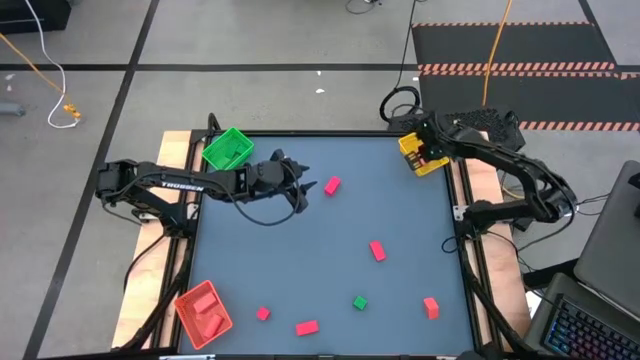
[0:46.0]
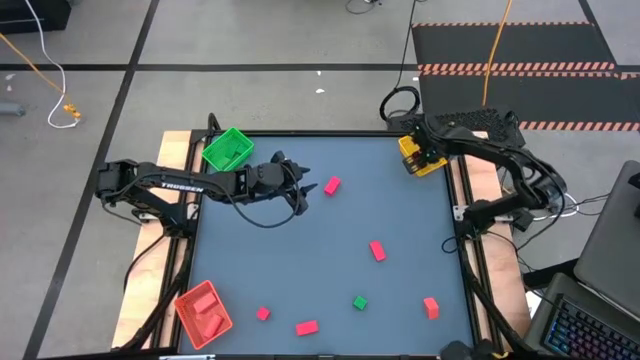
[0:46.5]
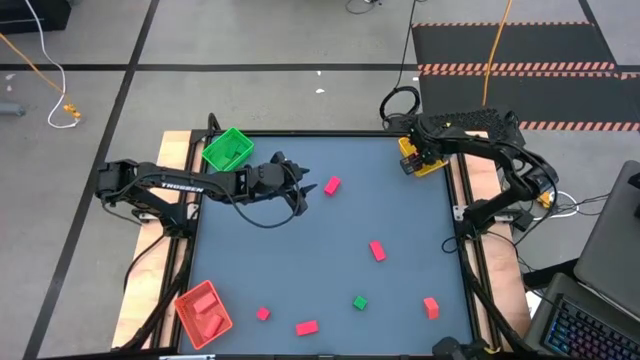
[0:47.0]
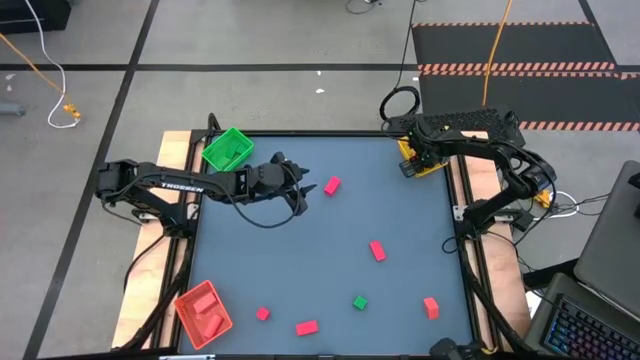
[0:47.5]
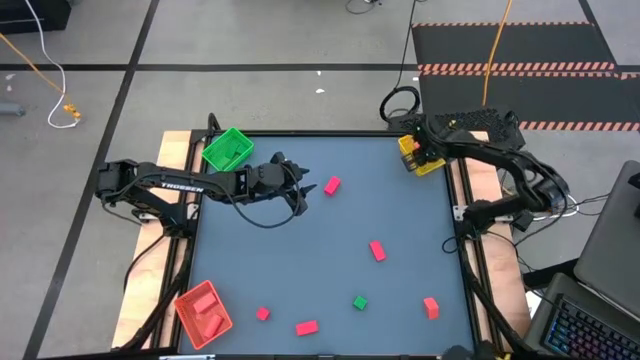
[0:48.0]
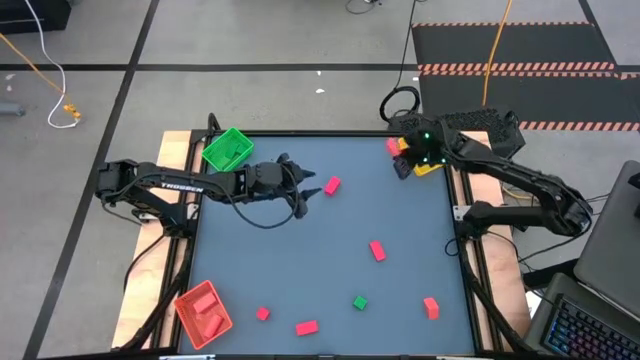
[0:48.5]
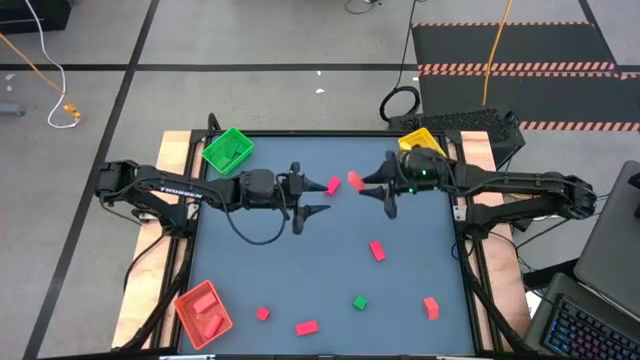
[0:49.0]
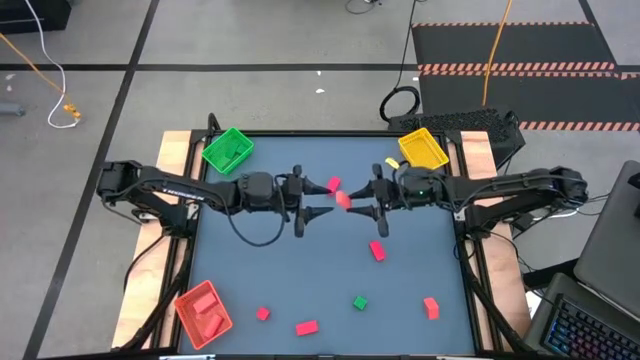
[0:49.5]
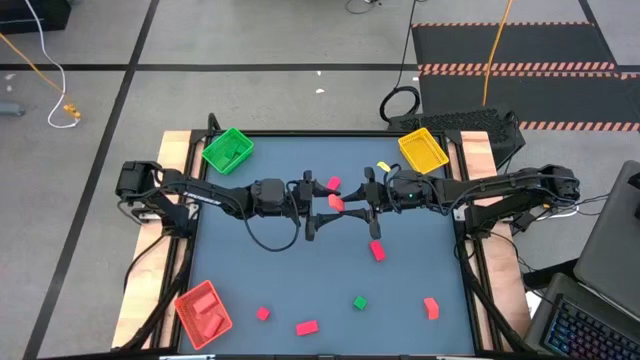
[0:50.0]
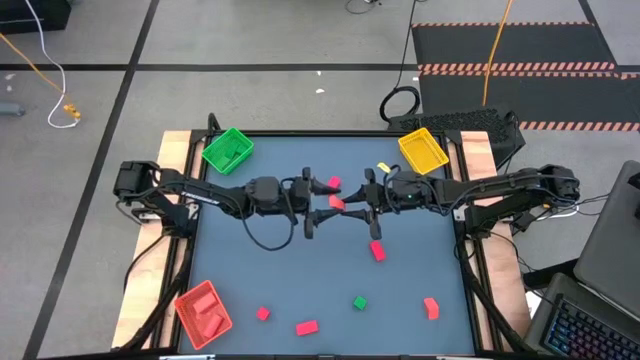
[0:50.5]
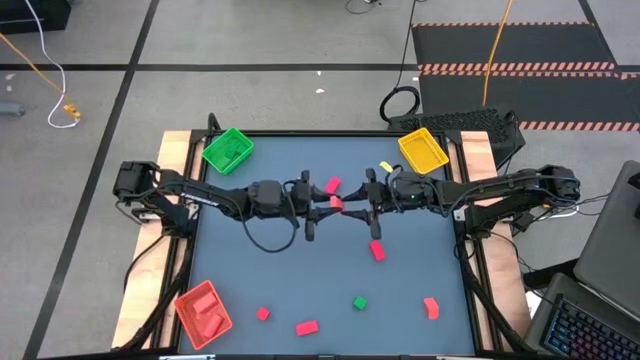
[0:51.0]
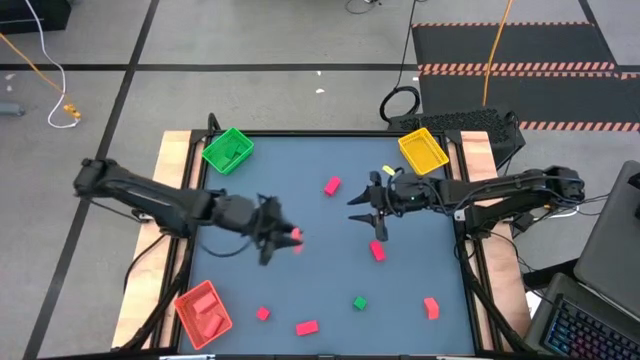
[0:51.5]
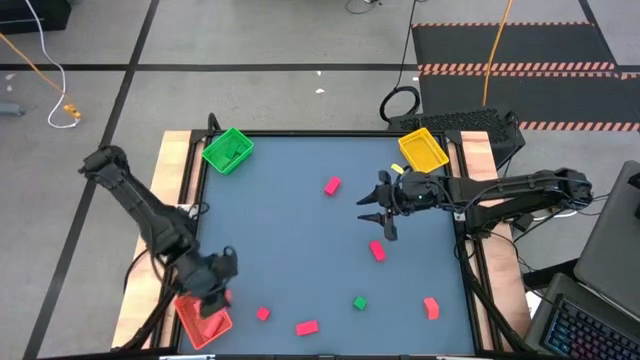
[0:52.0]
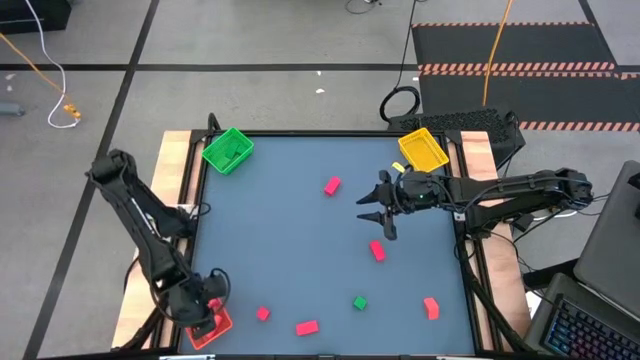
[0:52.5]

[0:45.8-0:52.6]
Task: Sort & place blocks by color
Put the orange block into the orange bin

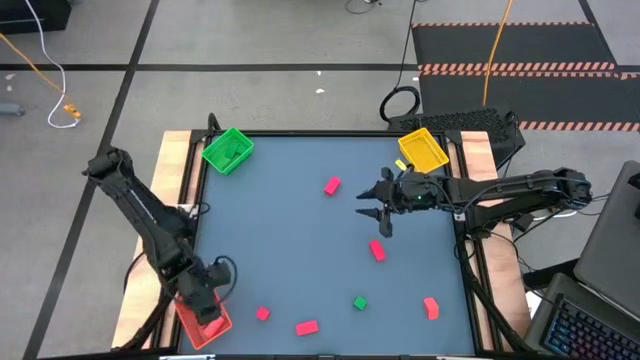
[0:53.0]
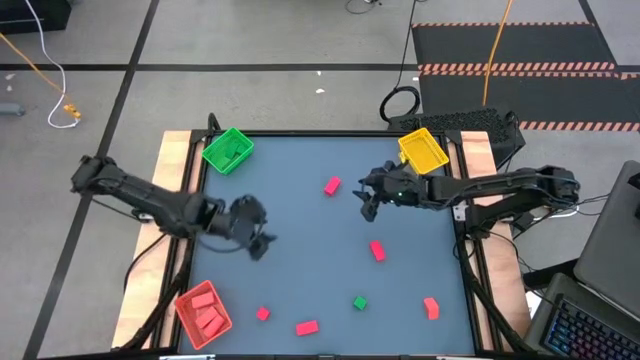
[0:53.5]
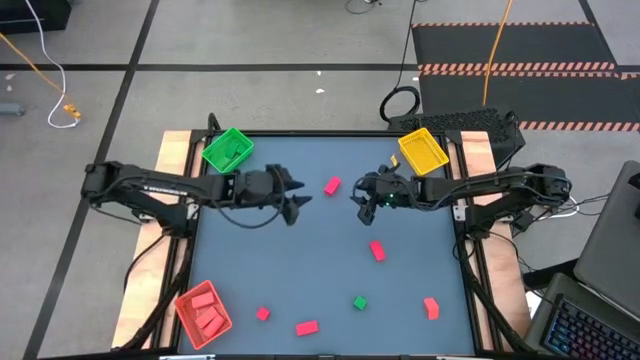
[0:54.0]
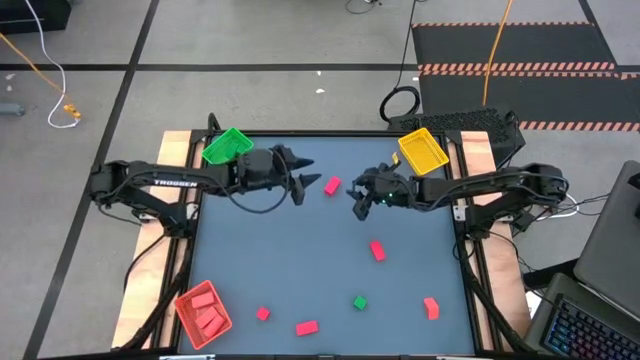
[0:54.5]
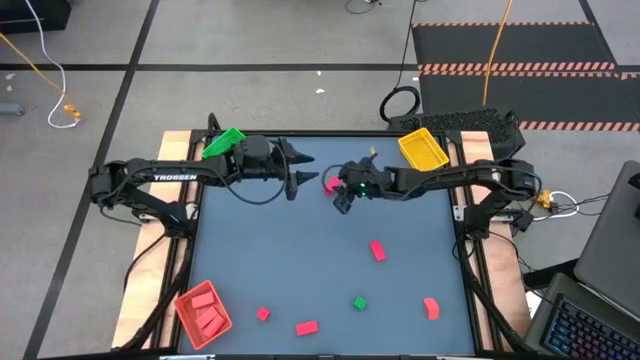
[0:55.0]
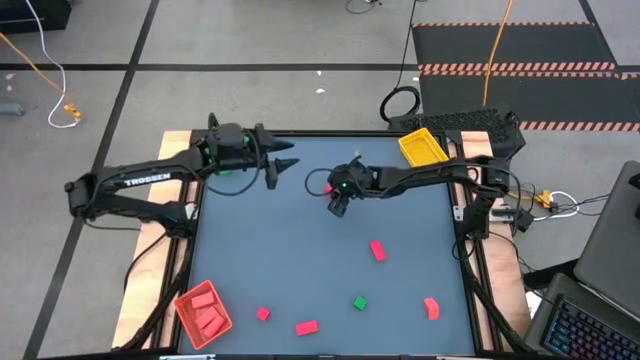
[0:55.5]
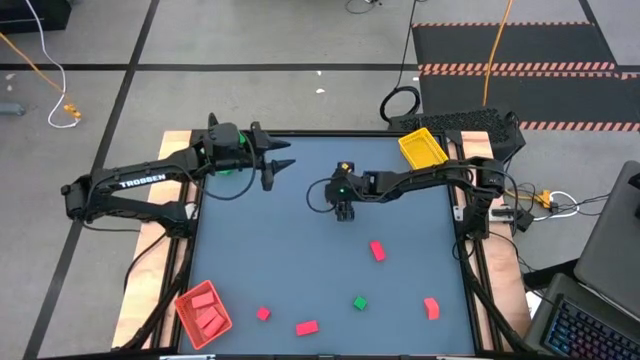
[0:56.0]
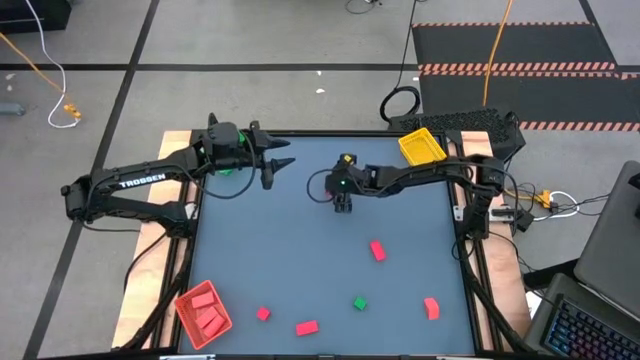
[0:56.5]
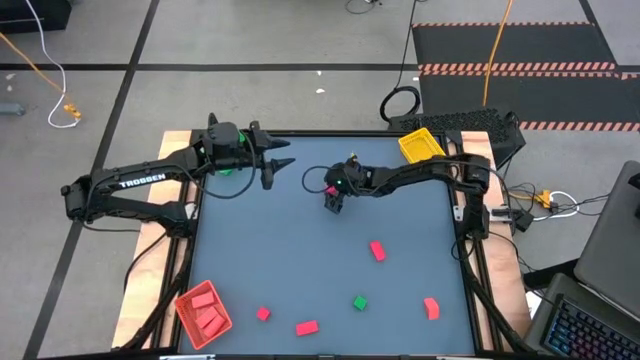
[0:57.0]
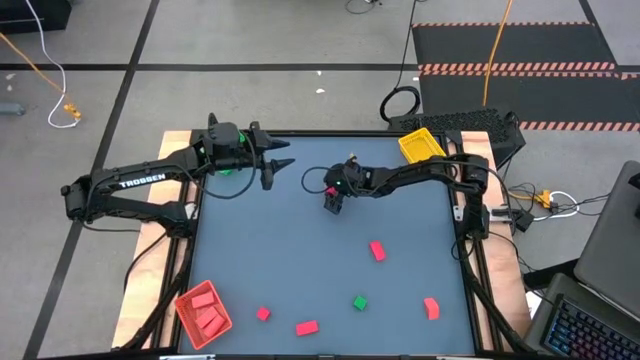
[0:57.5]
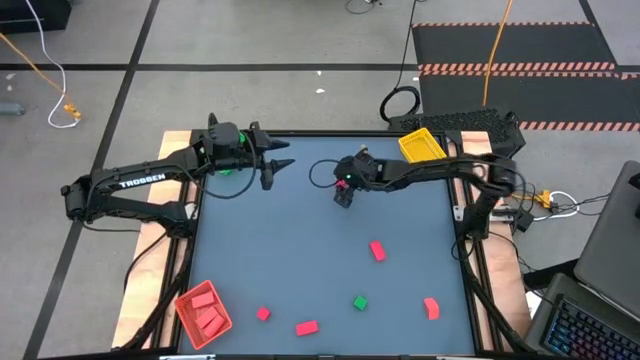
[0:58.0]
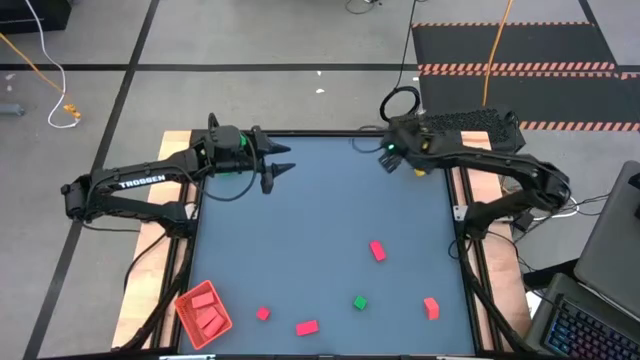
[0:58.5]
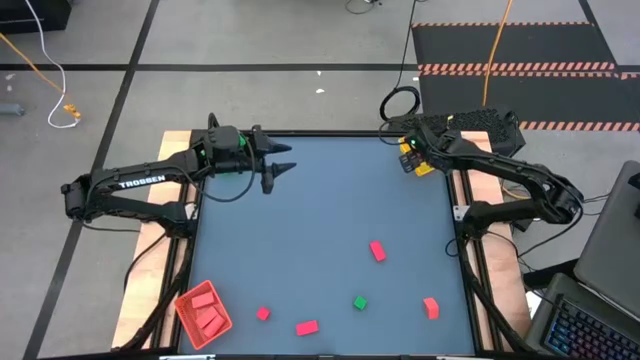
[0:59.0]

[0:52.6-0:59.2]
Put the red block into the yellow bin

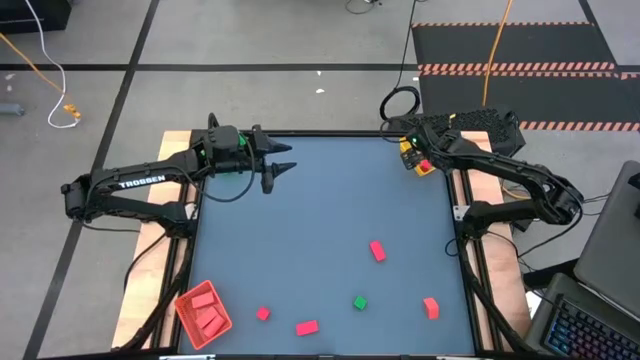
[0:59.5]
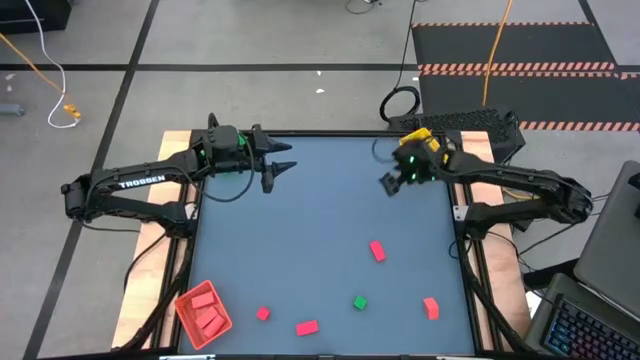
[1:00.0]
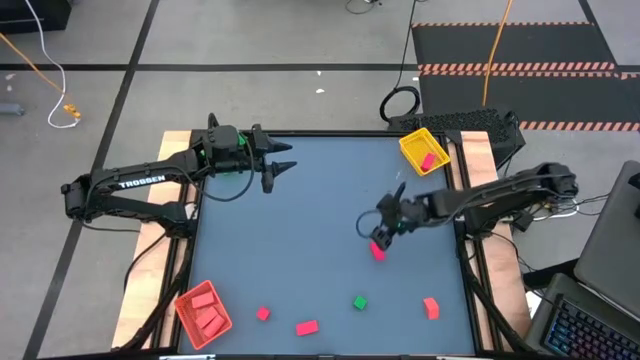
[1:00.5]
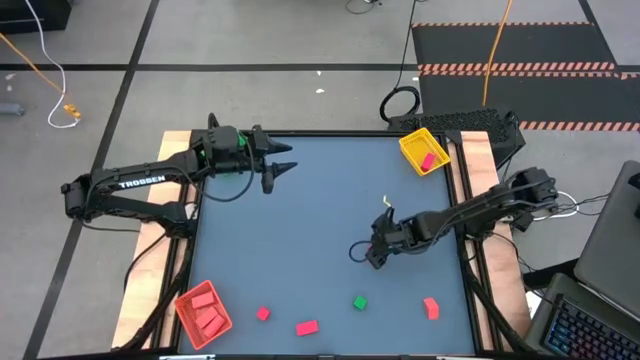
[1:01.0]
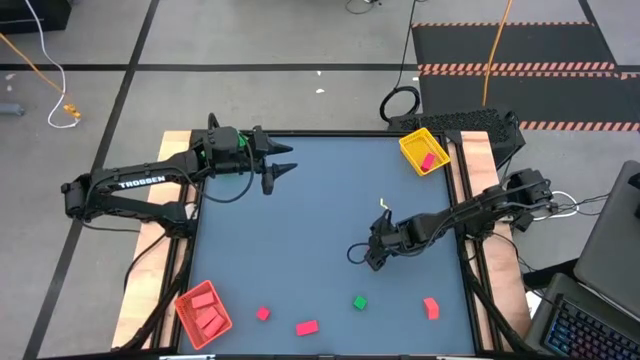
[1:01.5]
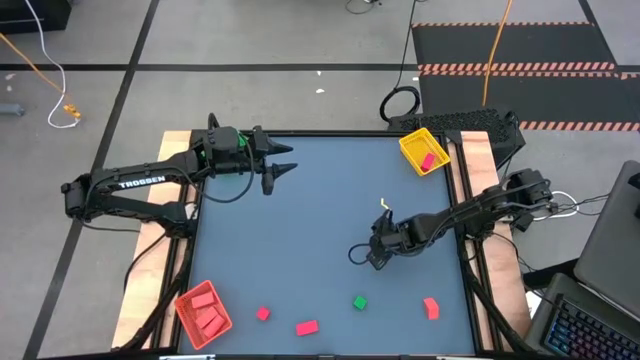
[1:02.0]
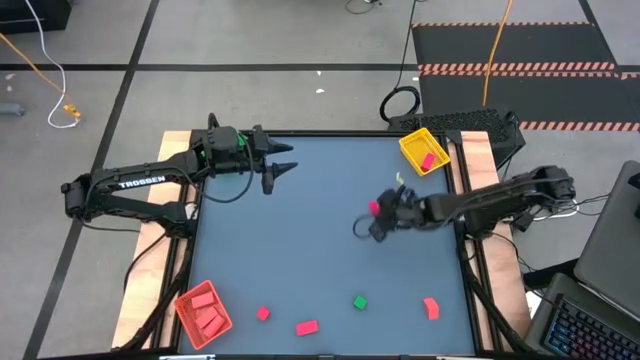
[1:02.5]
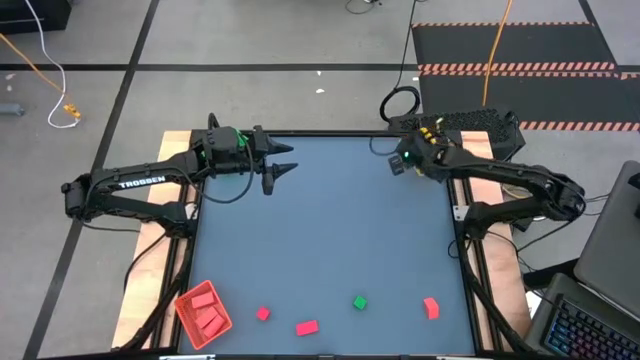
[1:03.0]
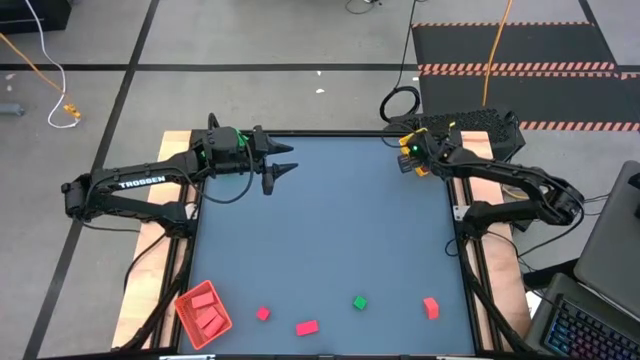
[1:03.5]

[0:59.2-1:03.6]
Put the red block into the yellow bin

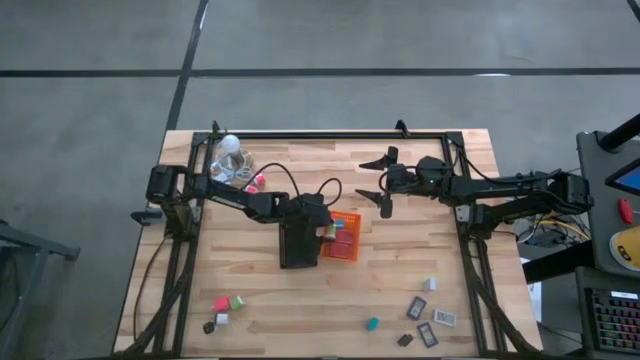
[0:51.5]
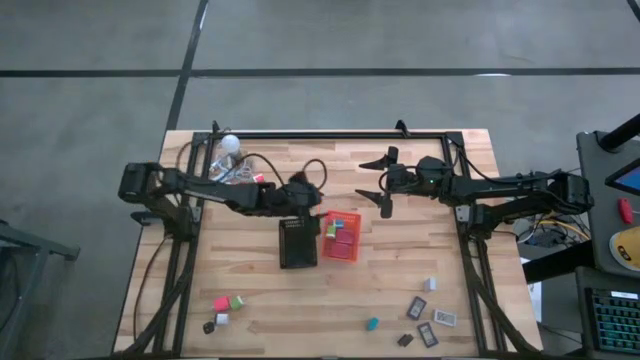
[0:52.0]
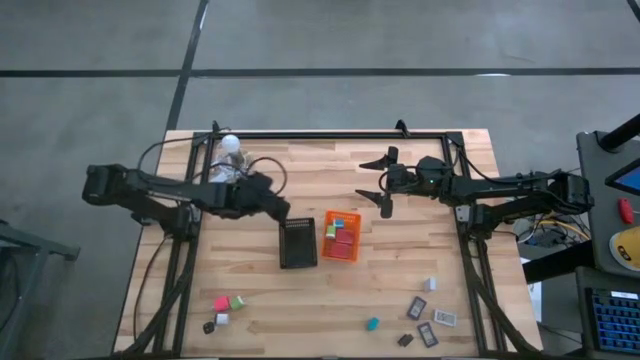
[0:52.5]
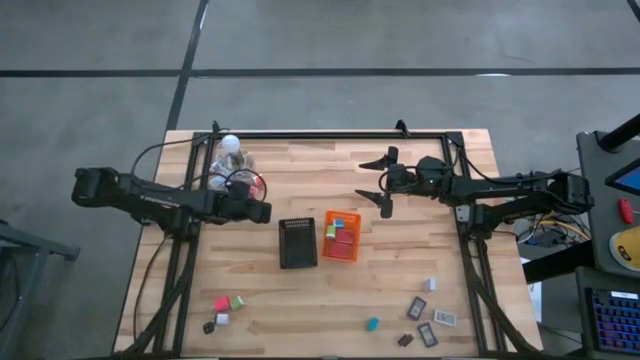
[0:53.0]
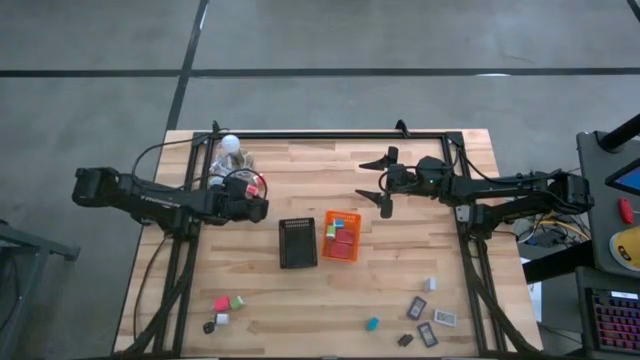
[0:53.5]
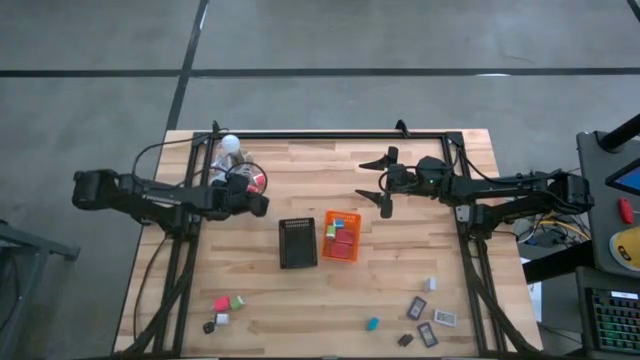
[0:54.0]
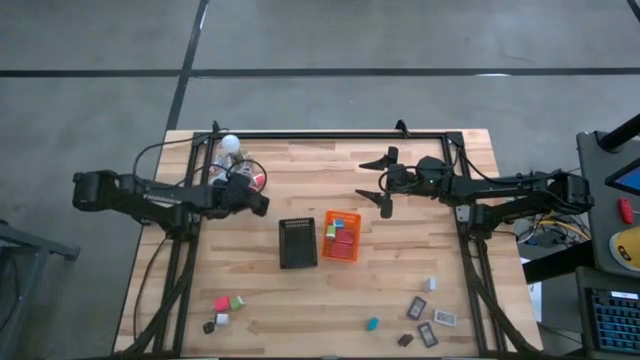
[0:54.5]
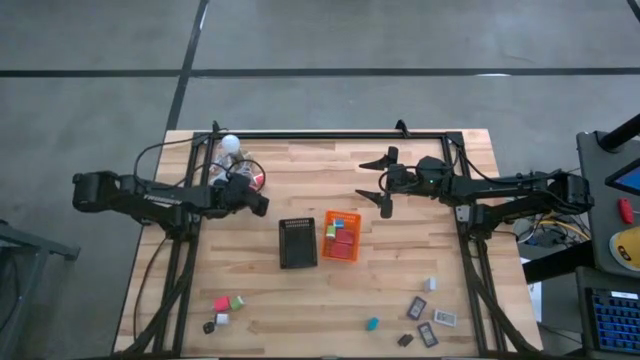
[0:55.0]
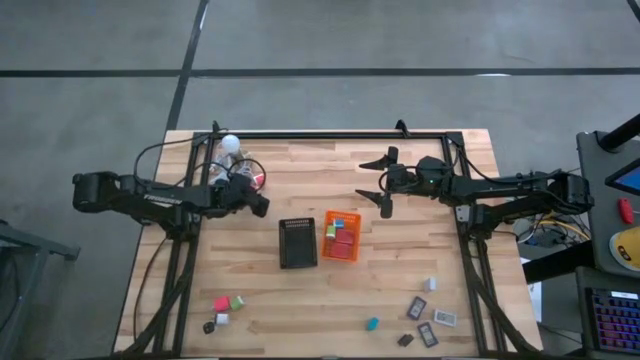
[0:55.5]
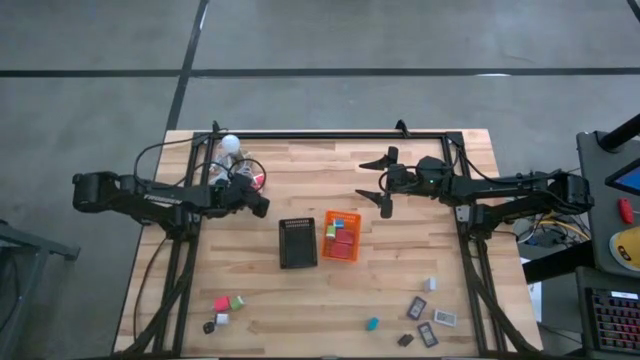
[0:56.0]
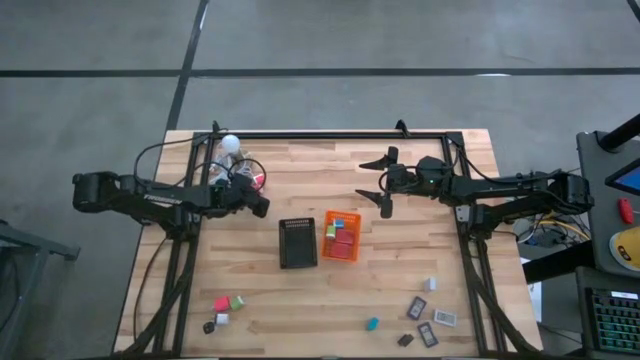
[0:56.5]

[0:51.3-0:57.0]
Task: Pick & Place Office items
Put the bottom light pink charger adapter into the orange bin
